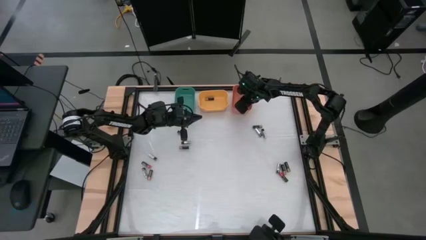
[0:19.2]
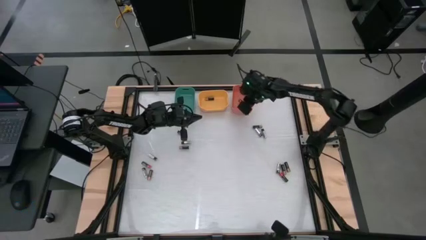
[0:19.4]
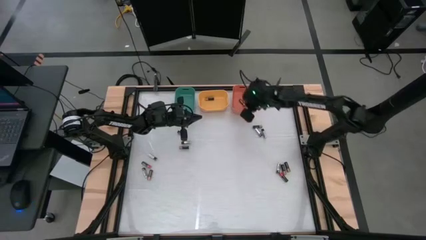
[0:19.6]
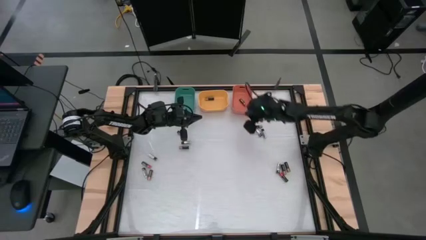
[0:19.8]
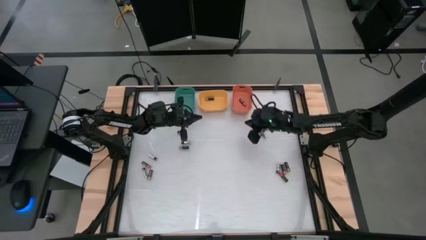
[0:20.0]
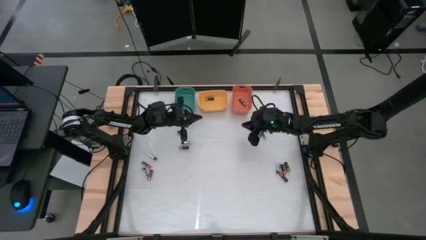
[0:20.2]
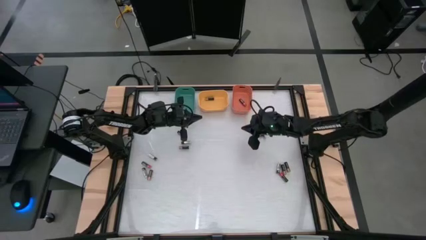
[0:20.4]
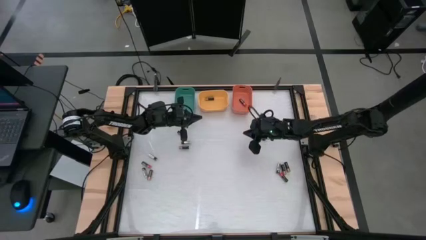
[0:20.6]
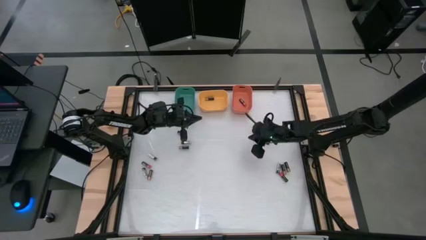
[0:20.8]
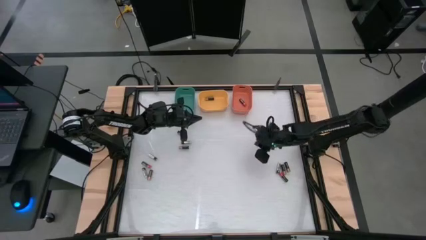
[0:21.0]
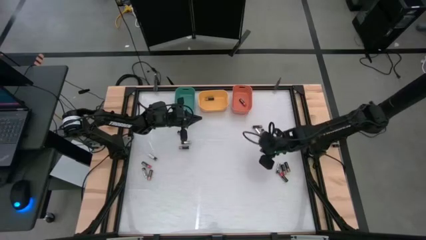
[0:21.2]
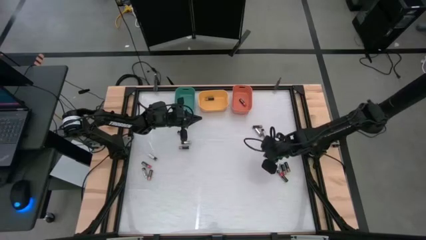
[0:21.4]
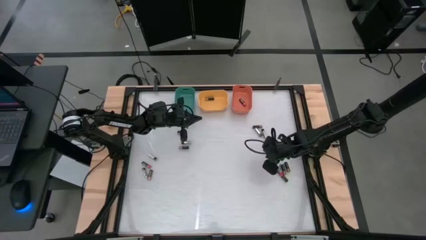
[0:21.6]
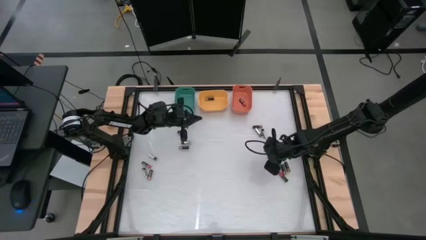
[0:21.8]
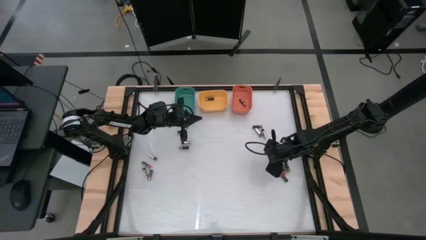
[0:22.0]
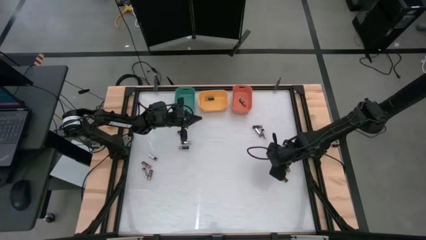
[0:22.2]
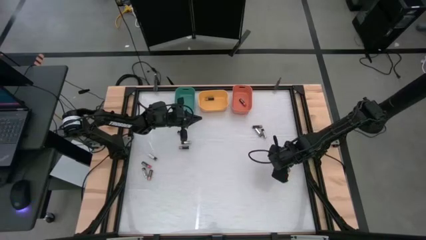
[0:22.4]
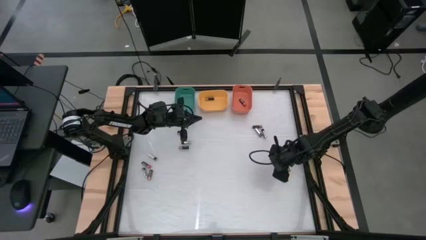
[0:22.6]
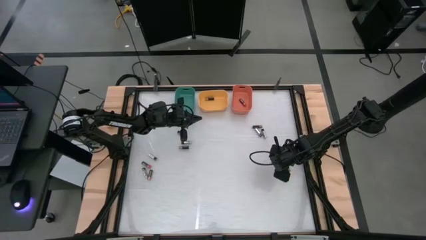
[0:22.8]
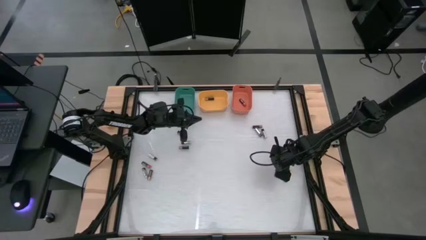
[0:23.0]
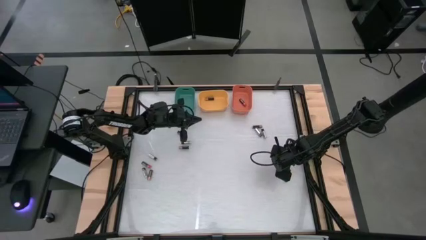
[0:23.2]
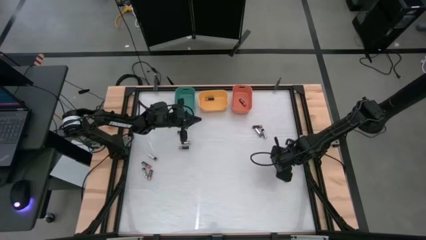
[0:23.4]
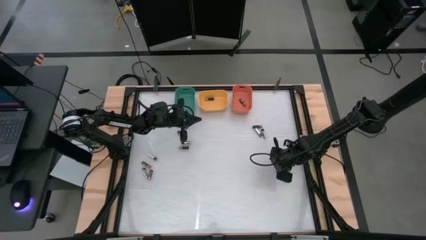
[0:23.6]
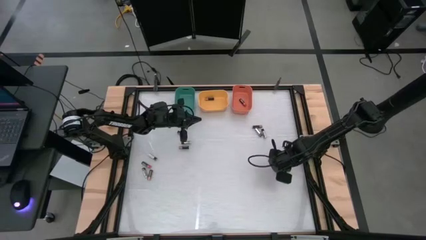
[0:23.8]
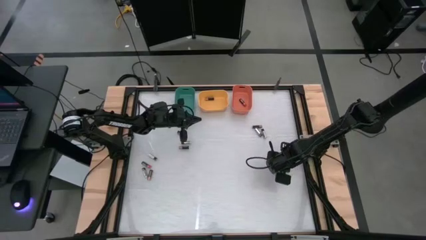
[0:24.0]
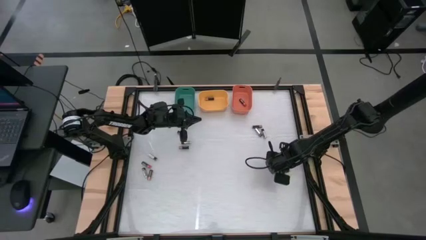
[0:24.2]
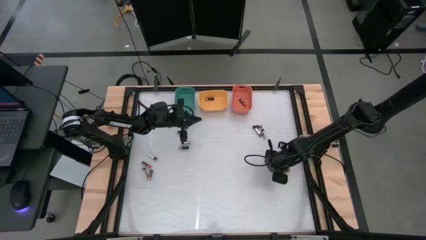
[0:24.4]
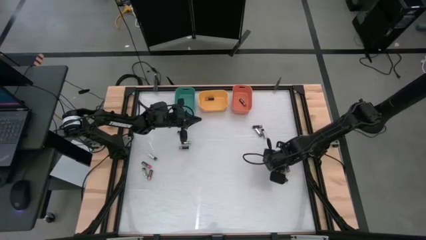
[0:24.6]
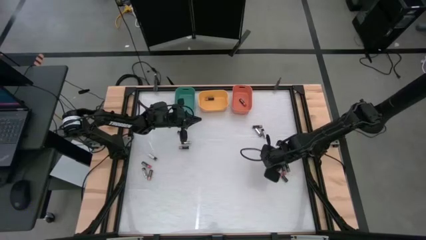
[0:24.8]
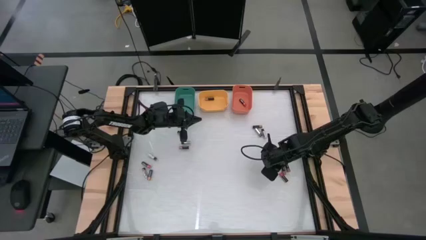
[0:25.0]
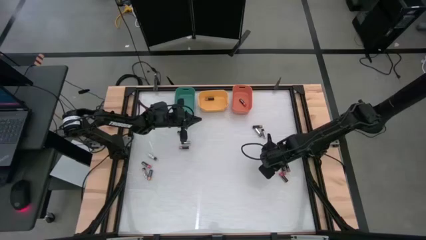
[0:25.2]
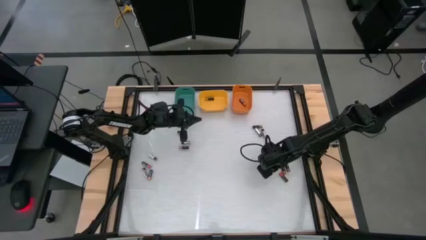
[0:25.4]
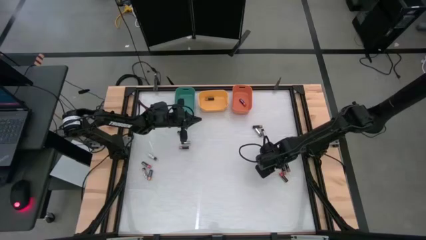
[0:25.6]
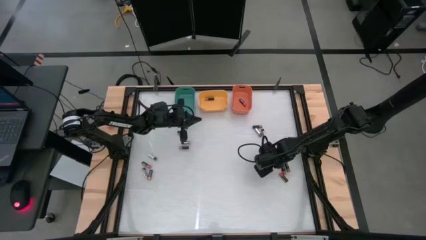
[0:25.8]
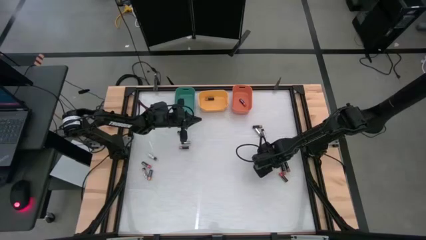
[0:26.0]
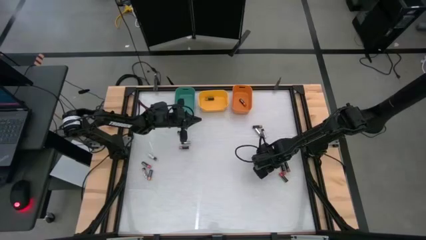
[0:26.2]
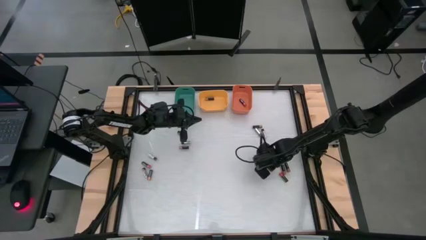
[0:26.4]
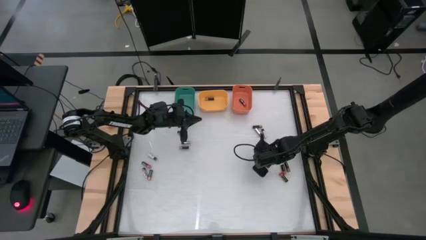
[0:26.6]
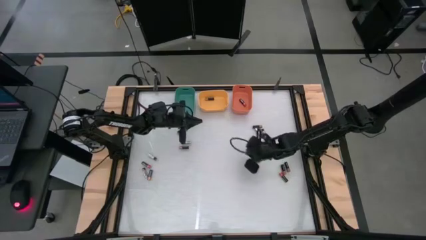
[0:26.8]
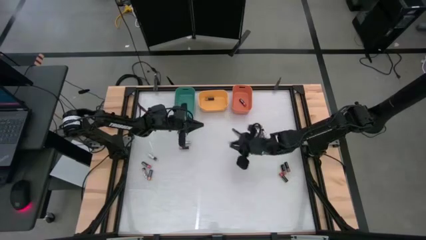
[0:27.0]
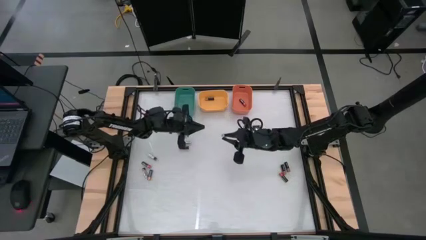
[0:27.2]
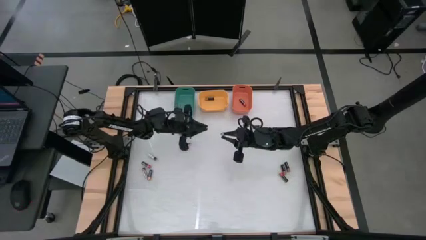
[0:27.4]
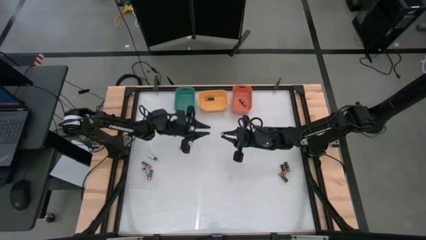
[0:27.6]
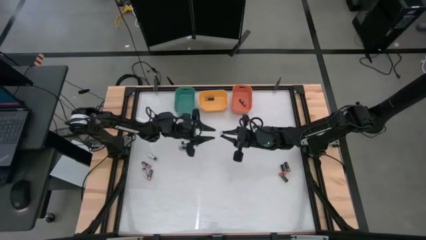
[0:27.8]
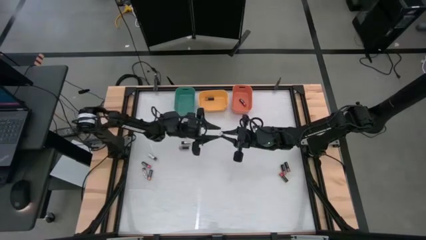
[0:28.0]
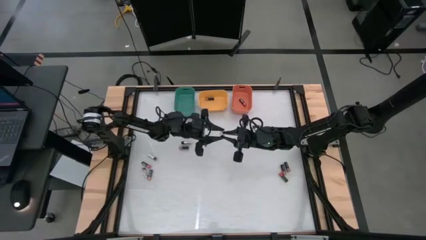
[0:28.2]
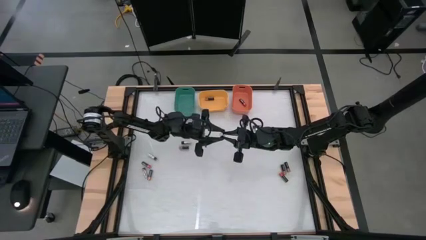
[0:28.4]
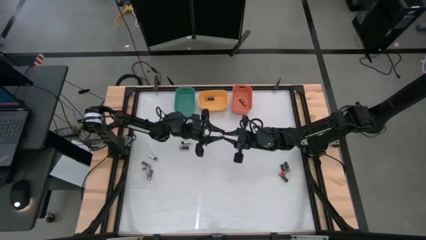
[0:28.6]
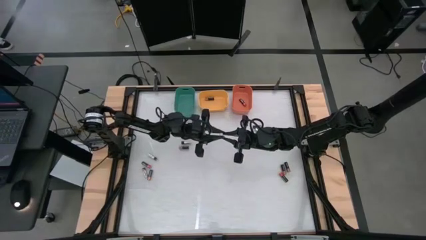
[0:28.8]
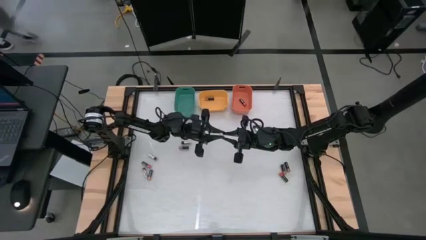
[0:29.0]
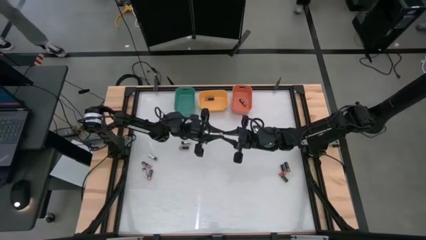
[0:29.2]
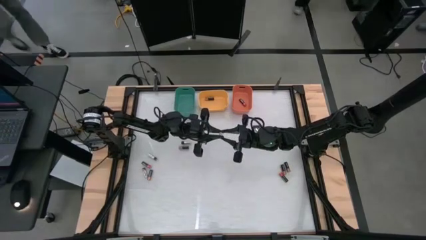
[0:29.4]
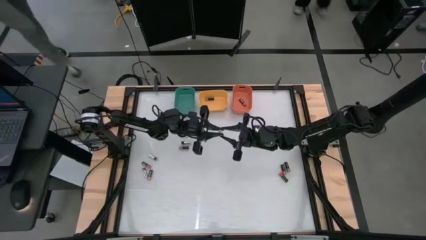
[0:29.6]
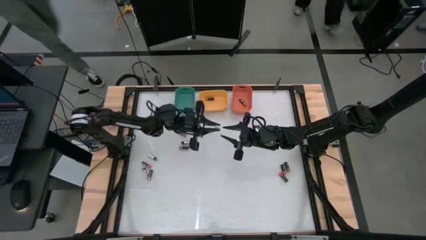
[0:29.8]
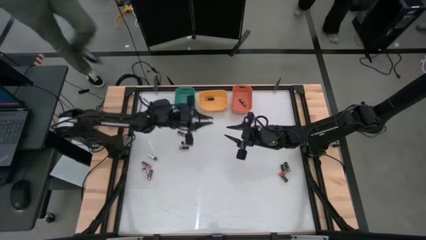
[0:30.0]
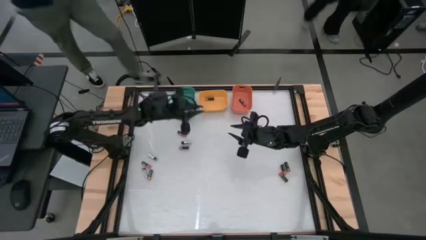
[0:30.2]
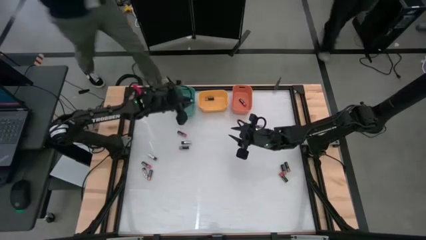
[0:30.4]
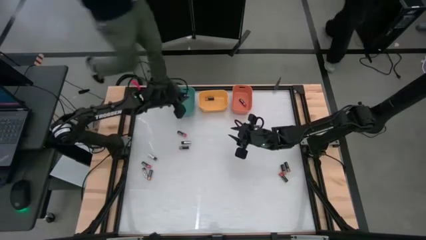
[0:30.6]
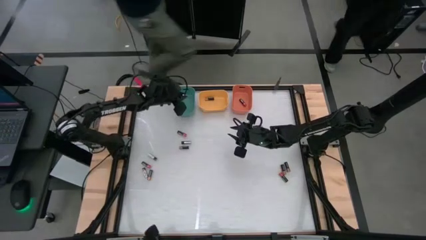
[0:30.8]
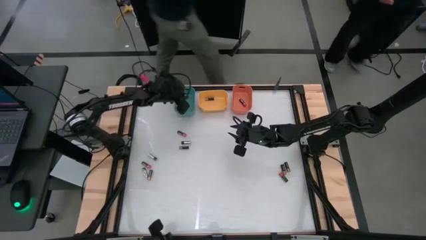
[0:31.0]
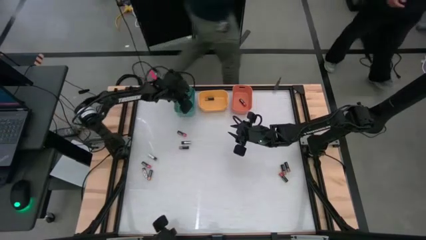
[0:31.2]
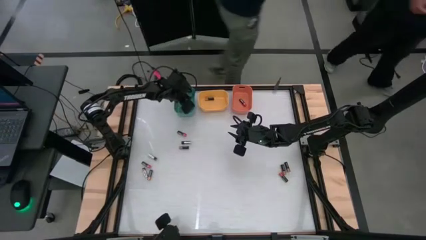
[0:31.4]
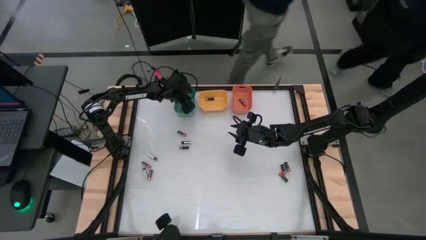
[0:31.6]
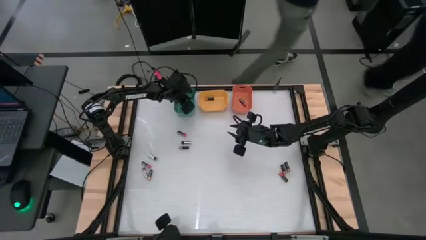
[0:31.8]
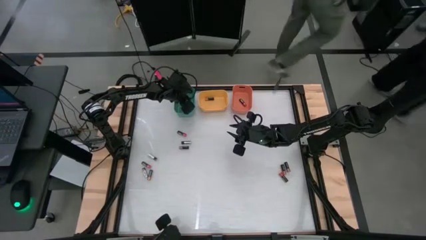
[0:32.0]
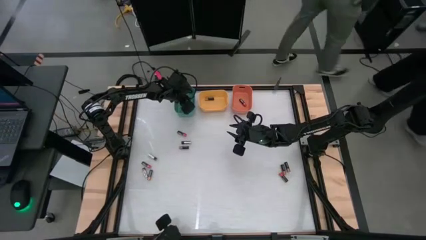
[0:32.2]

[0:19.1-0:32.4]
Task: Sort batteries
Put the silver battery into the green bin

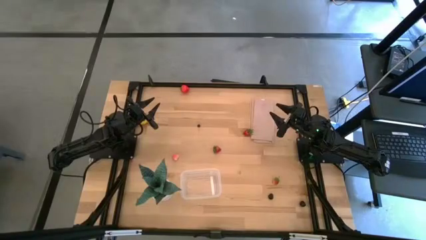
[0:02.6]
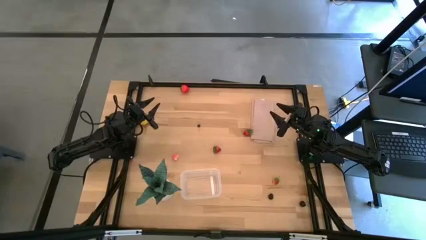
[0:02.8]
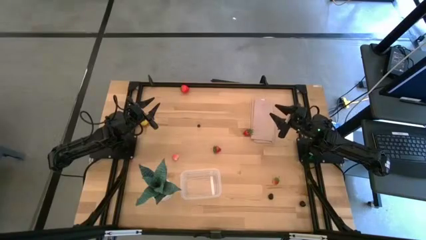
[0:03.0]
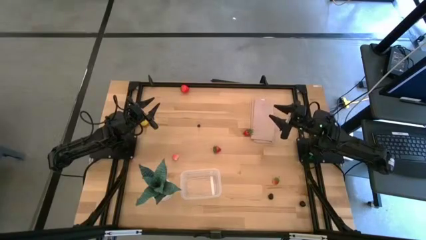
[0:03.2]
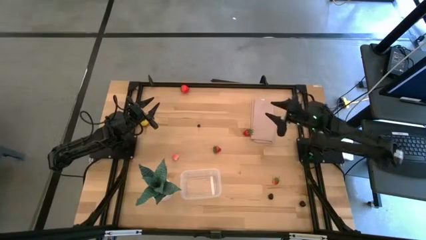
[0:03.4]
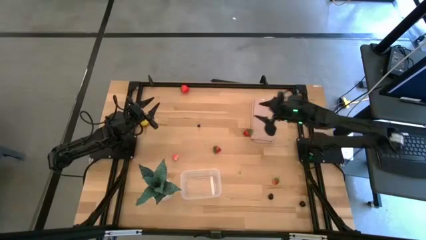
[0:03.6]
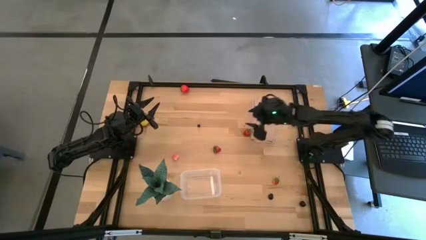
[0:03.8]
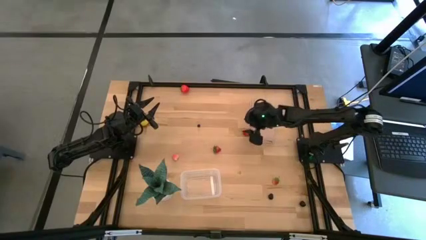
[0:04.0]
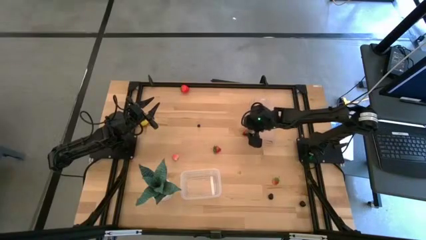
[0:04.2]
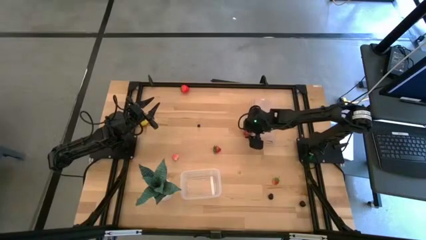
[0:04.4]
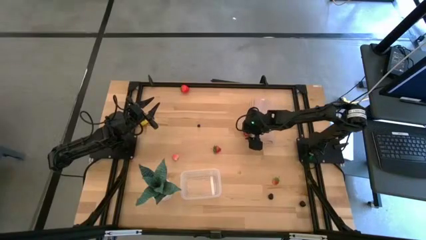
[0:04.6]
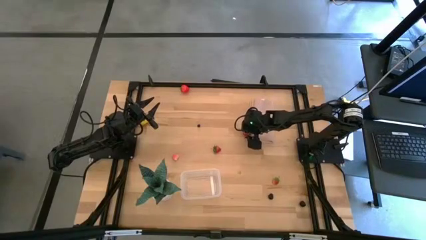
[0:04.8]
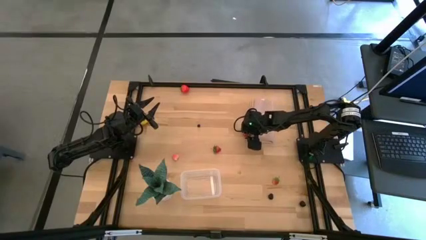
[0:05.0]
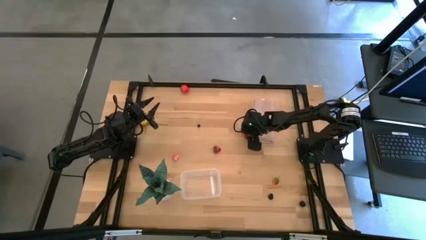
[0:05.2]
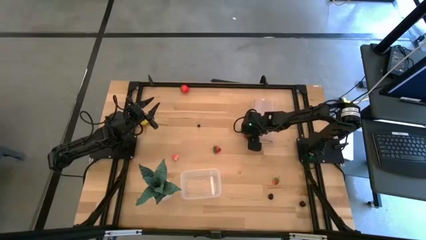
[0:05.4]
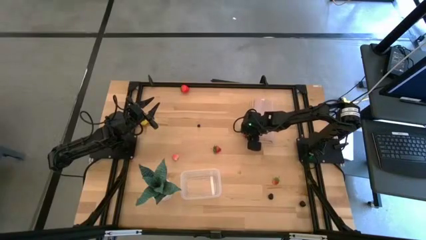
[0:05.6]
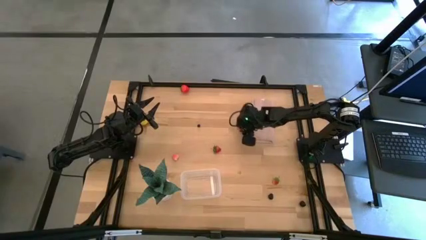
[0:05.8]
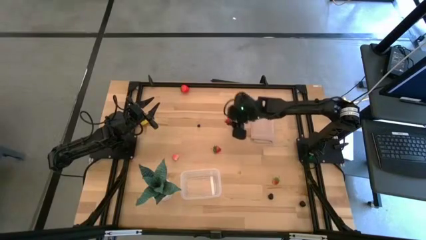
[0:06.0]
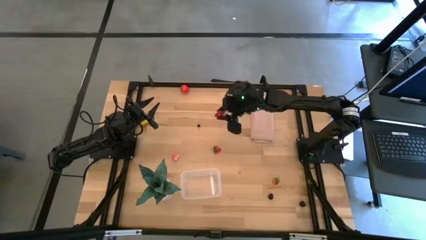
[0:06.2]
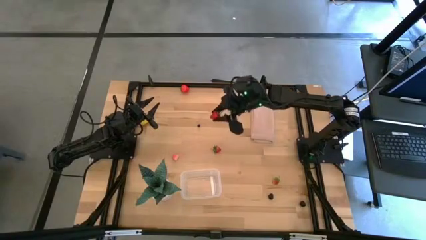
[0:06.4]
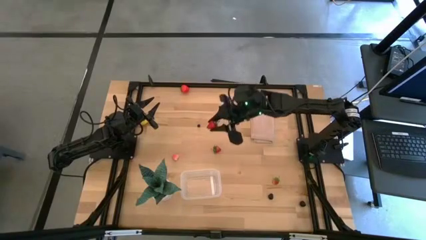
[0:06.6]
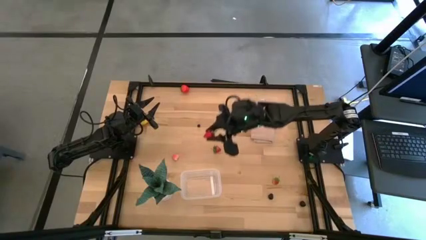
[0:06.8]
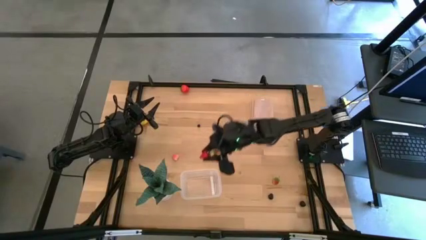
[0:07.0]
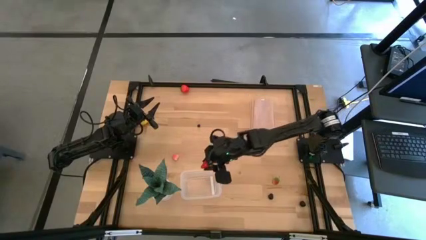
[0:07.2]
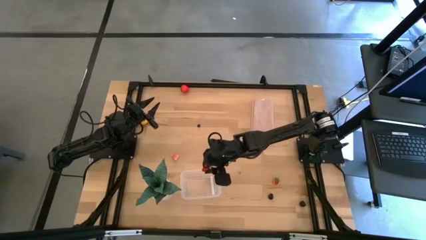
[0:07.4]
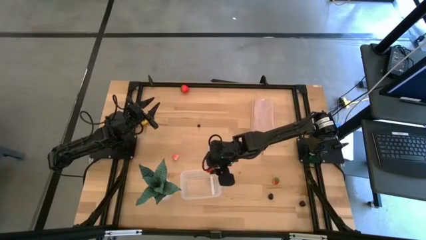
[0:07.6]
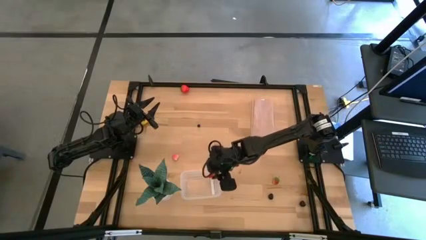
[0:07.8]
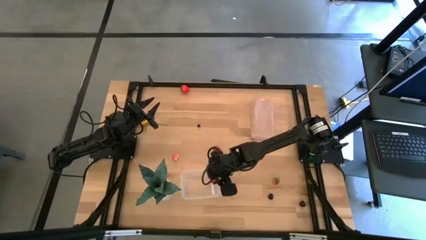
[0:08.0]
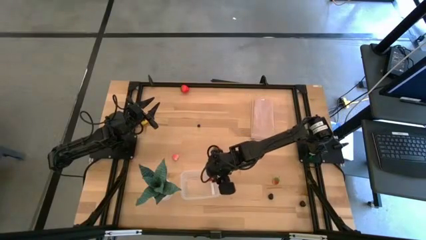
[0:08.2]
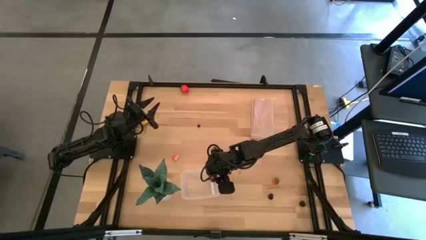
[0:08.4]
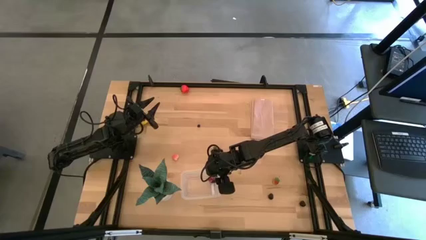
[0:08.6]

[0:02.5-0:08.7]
Task: Pick and placing Produce into tupperware
Put the middle right red strawberry into the transparent bin
